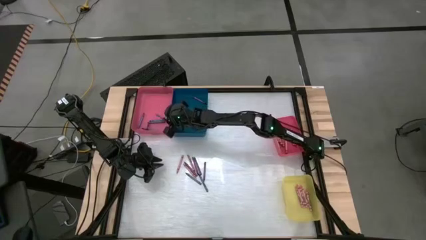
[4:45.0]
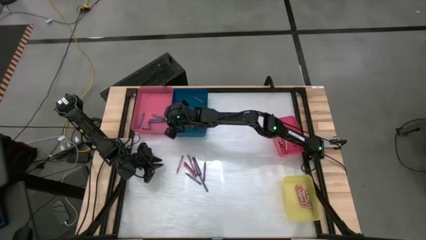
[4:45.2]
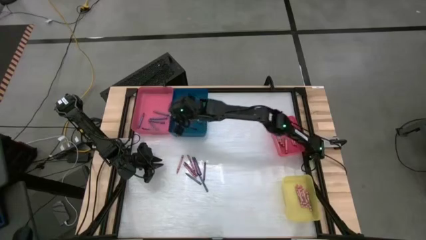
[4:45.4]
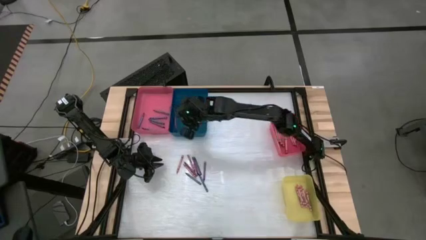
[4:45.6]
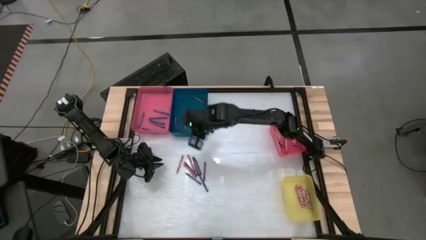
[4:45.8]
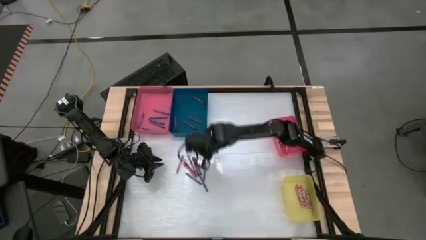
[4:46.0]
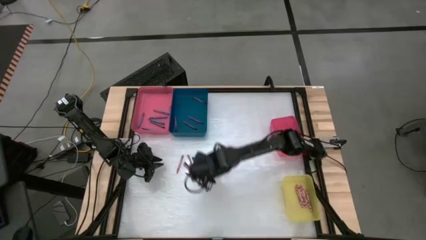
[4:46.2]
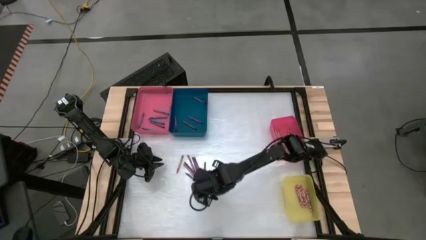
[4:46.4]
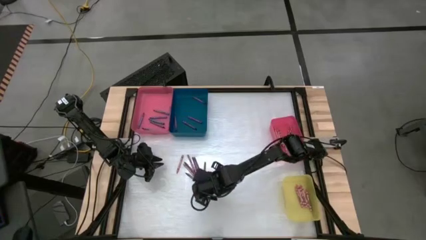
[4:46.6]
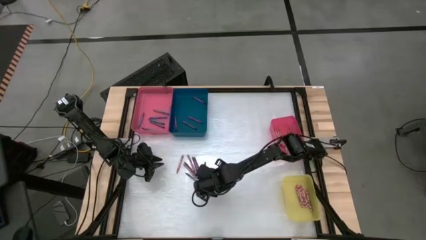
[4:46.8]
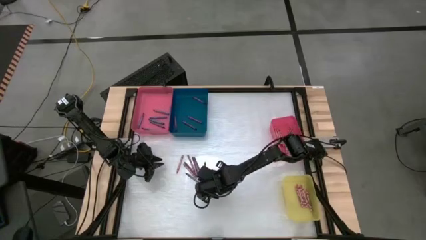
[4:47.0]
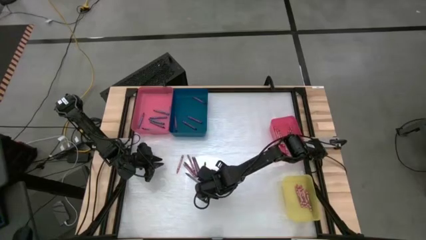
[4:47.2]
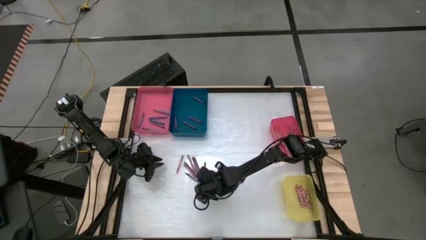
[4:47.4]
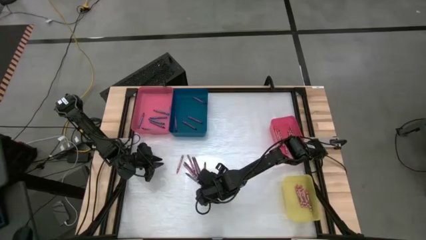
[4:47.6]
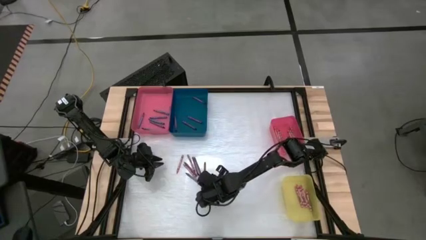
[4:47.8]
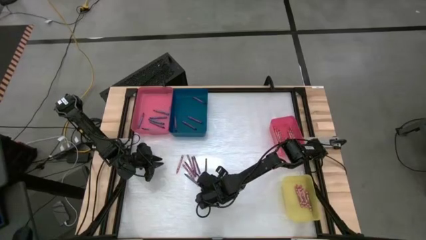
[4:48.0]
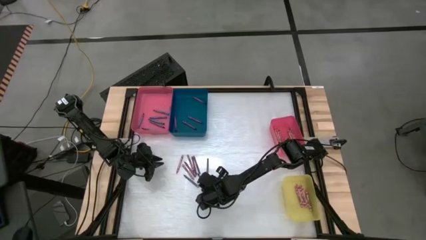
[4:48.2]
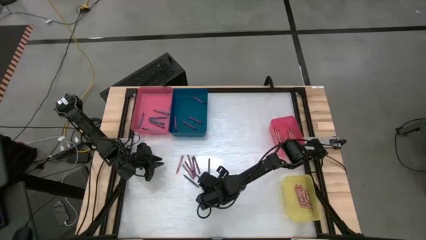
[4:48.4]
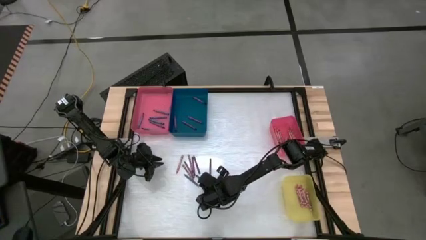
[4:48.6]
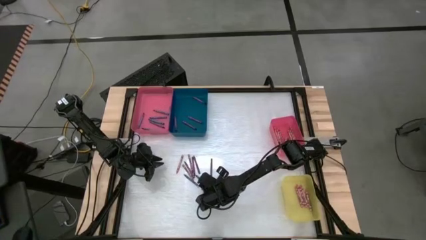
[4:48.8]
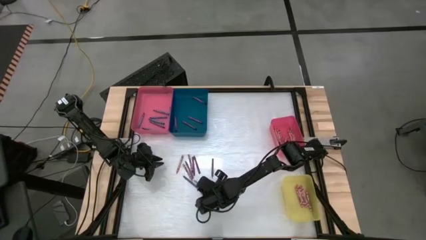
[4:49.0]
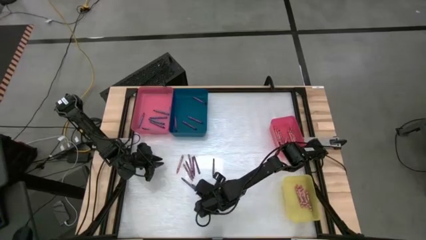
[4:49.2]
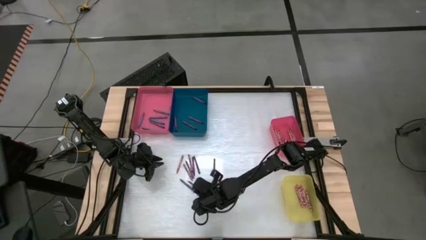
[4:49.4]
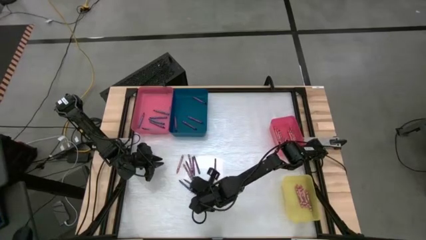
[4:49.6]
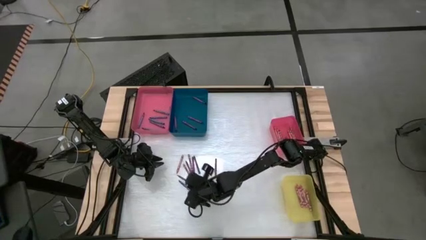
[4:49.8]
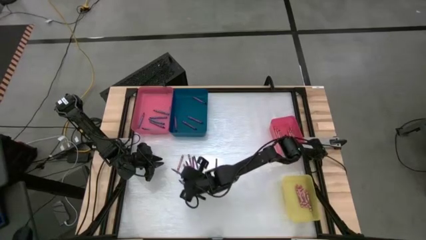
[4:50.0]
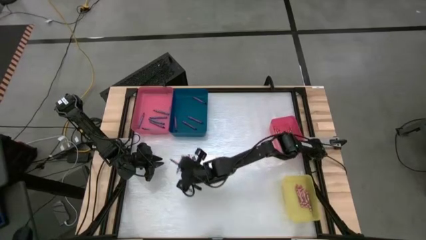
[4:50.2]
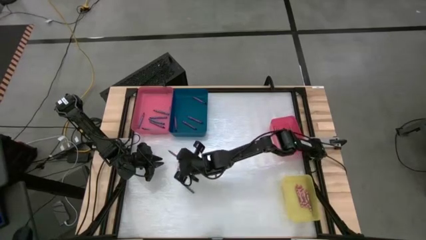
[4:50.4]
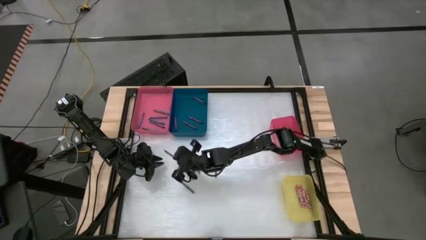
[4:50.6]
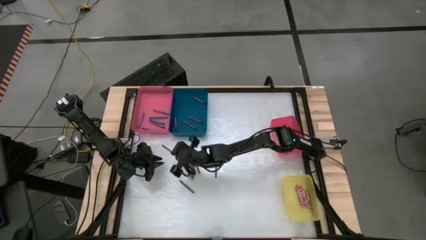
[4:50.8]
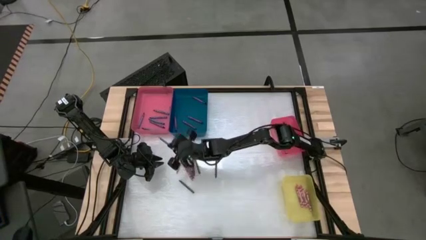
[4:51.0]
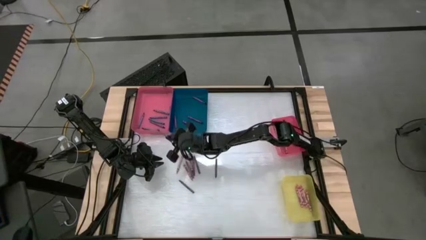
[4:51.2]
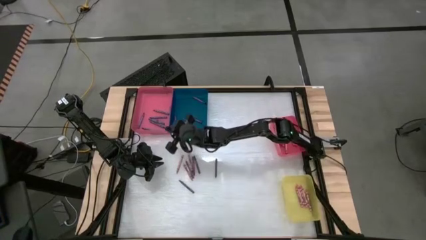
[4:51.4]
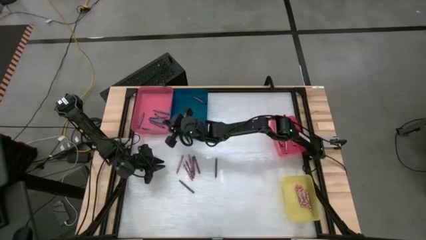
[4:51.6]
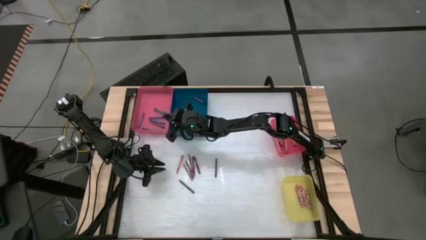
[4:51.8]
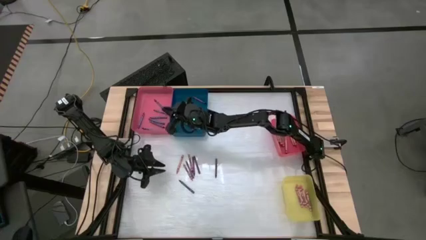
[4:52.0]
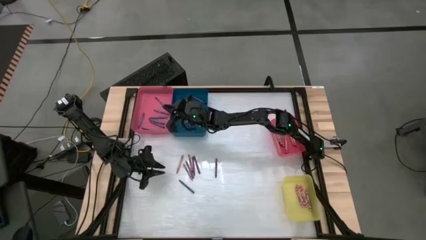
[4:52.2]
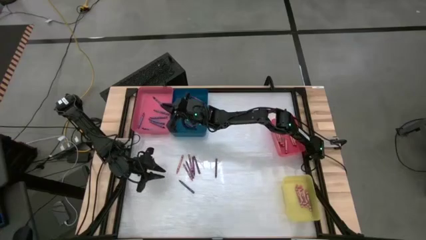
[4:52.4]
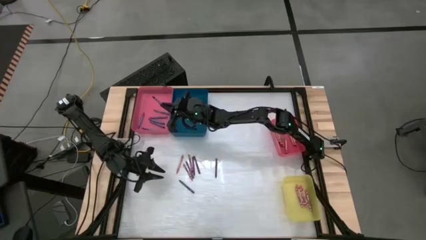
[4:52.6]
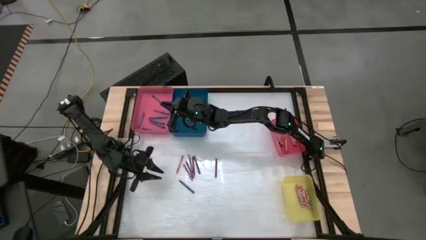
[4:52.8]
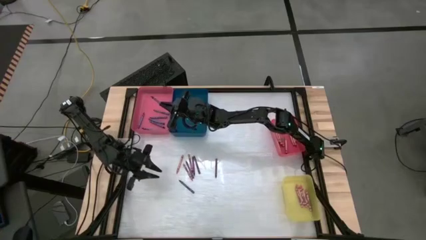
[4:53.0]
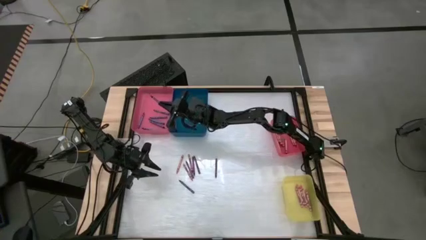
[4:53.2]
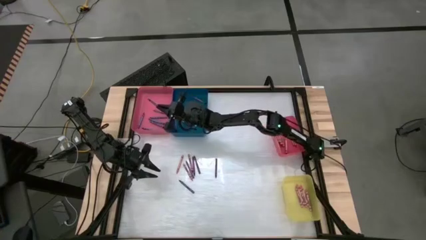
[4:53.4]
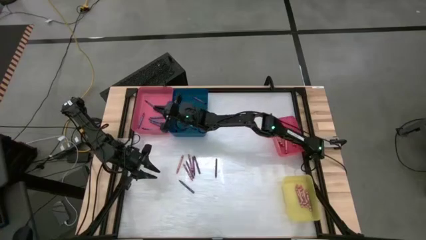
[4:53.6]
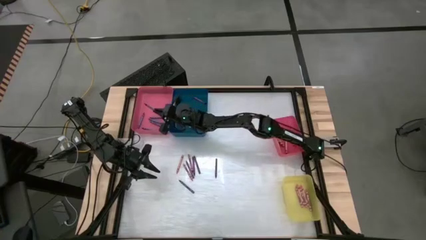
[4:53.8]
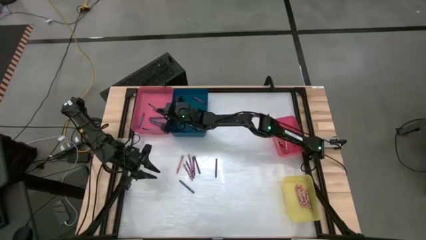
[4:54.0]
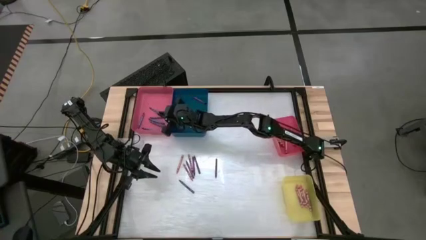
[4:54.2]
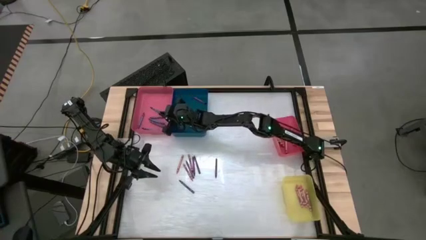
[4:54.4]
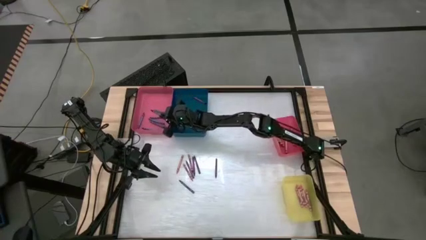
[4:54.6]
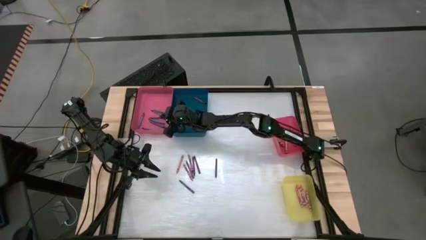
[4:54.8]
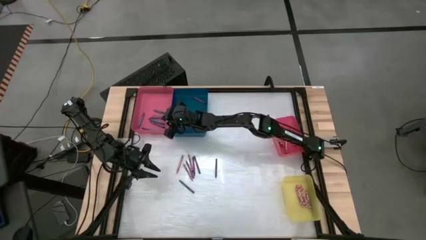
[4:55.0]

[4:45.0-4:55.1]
Task: Sort crayons
Put the blue crayon into the large red bin

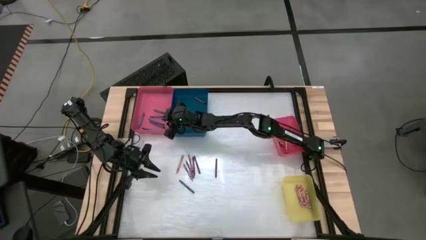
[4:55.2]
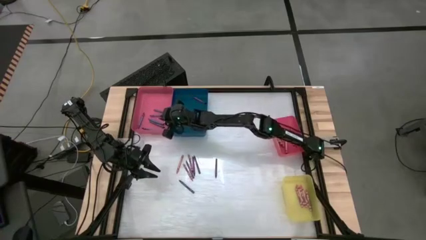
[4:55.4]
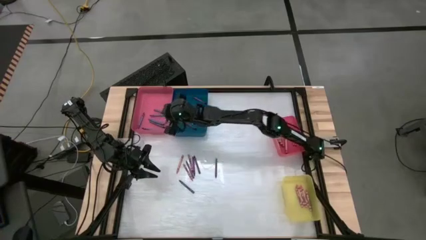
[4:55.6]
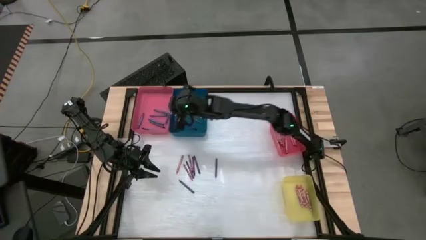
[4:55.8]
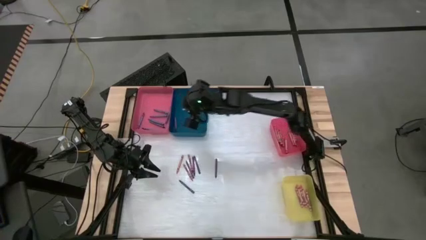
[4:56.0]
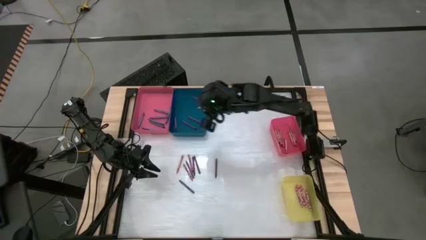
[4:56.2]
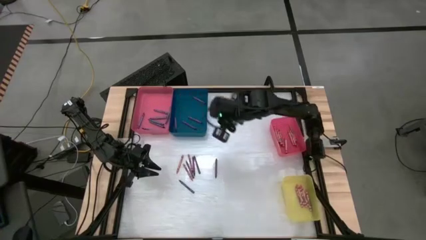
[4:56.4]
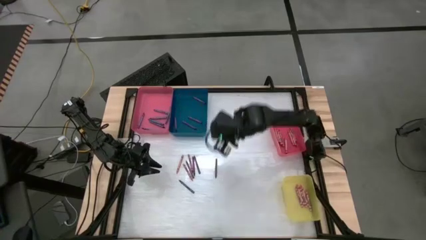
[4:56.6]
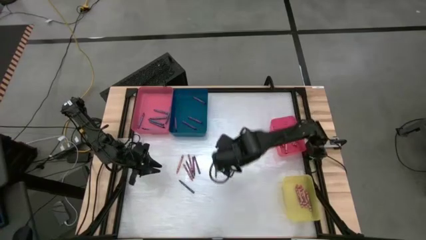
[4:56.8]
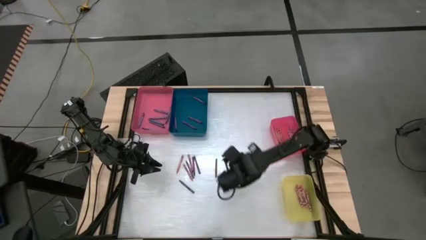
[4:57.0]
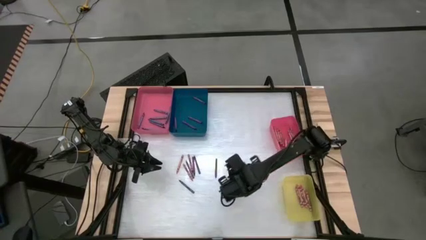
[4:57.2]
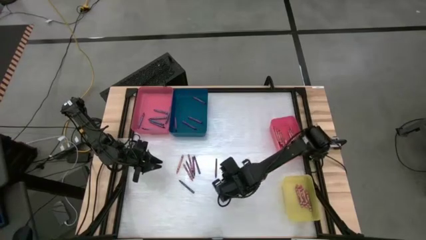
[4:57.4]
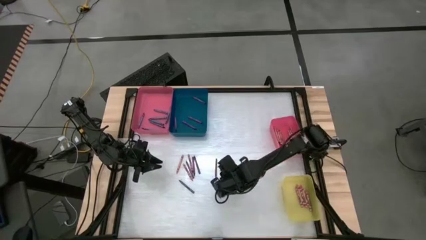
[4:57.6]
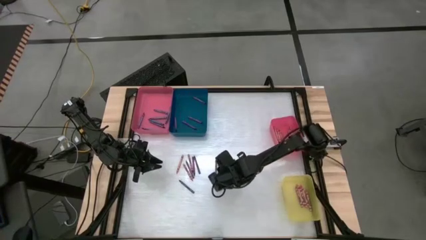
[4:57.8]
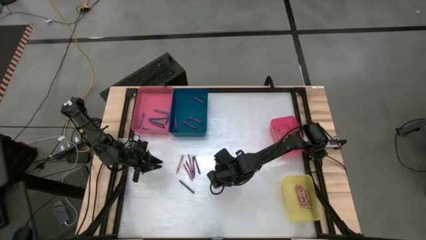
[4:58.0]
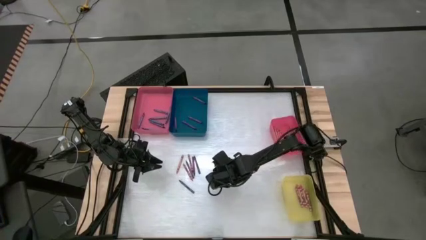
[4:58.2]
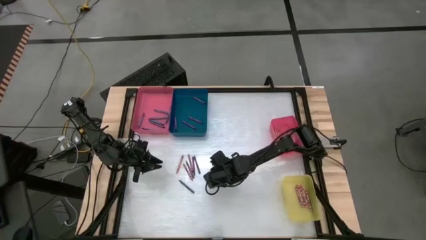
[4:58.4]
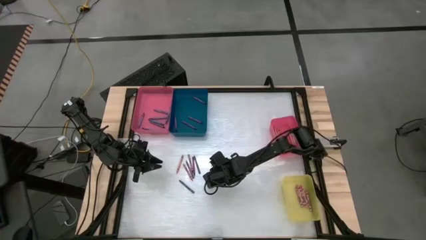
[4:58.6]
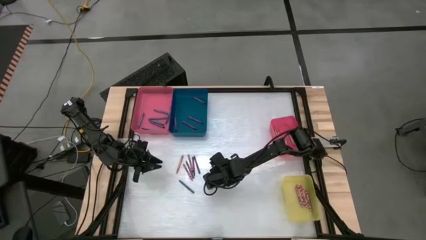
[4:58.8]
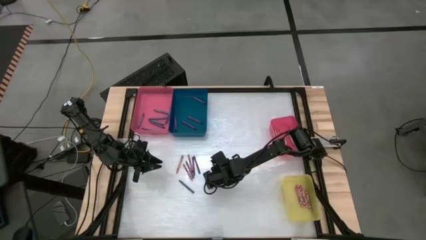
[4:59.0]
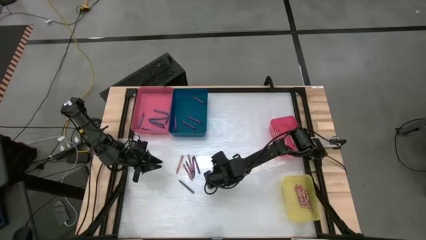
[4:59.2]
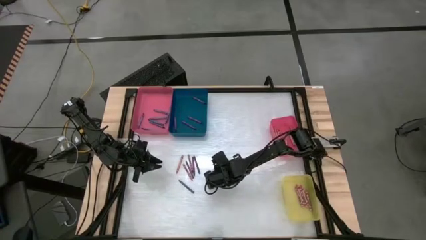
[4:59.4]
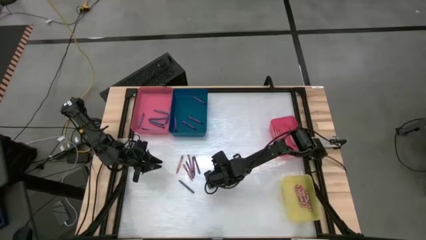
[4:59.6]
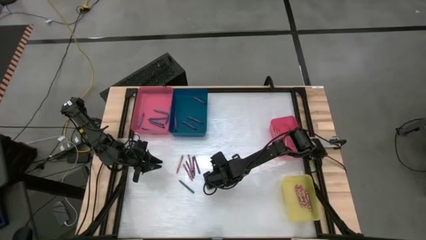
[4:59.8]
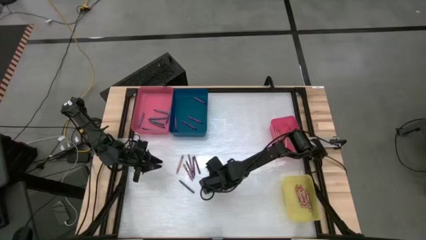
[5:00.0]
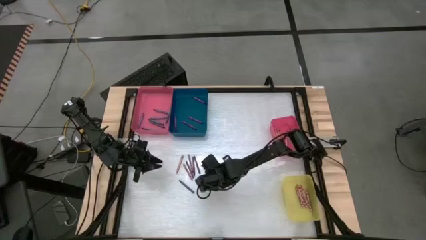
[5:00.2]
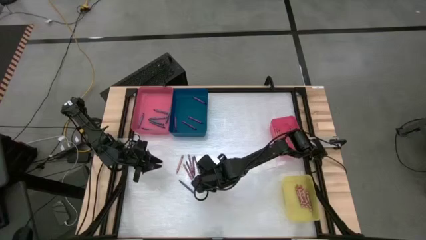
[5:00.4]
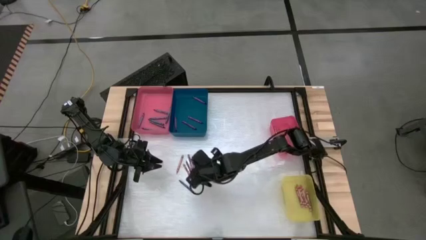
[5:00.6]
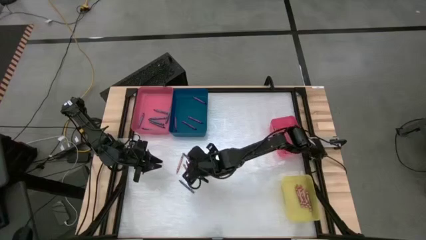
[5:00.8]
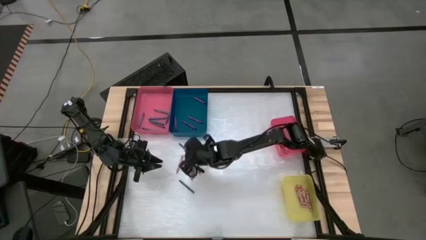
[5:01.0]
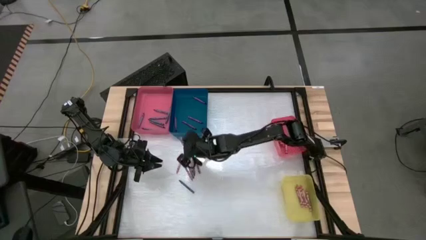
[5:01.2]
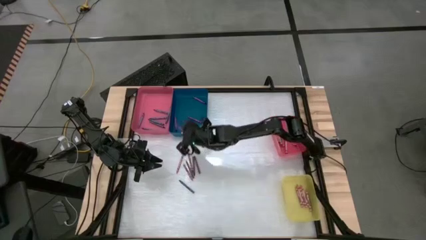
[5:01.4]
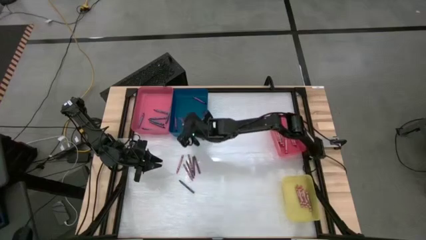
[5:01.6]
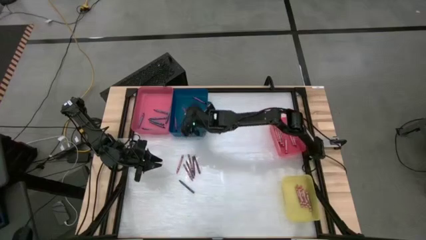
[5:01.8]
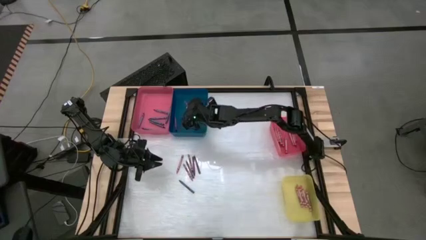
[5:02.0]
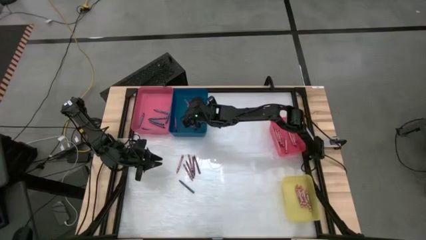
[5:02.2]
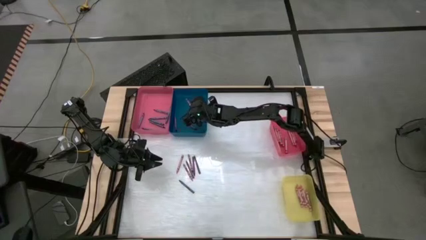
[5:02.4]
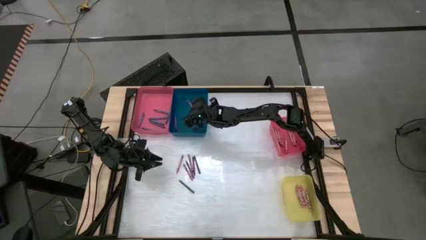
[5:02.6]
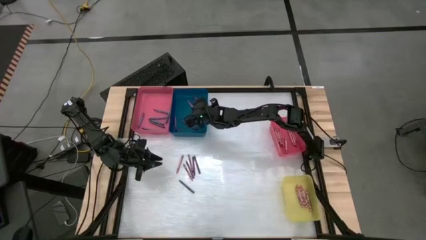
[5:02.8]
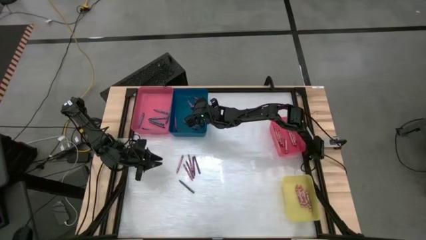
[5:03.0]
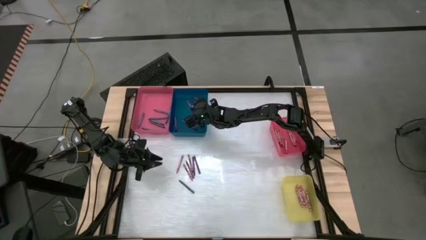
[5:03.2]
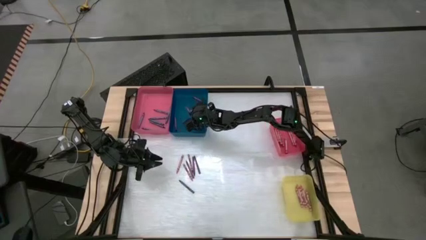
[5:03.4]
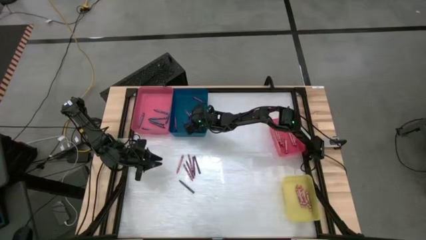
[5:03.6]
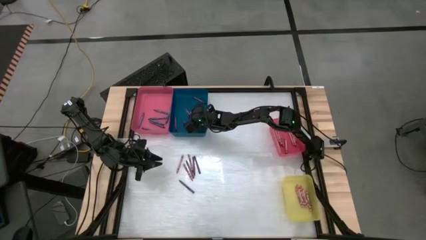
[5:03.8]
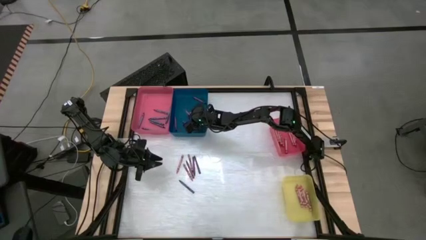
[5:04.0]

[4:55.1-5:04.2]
Put the purple crayon into the blue bin
